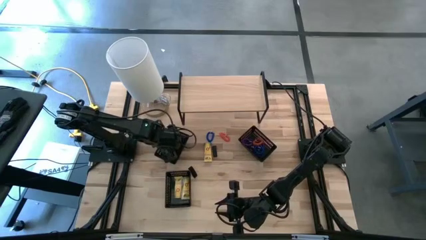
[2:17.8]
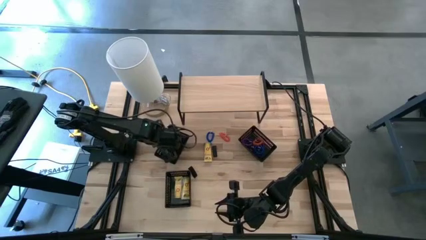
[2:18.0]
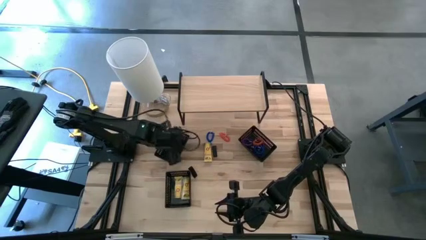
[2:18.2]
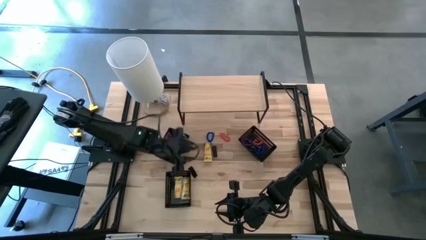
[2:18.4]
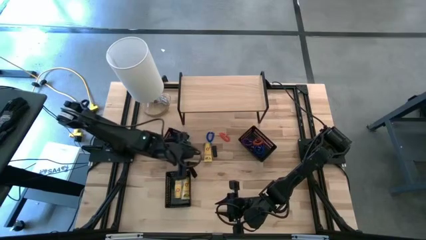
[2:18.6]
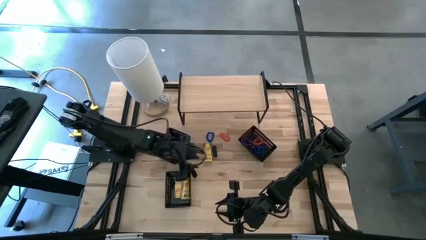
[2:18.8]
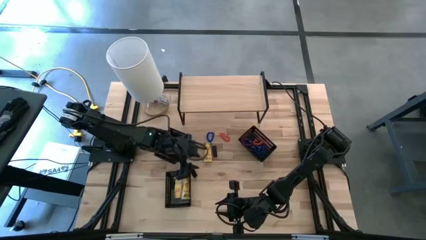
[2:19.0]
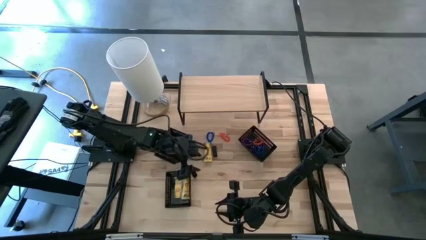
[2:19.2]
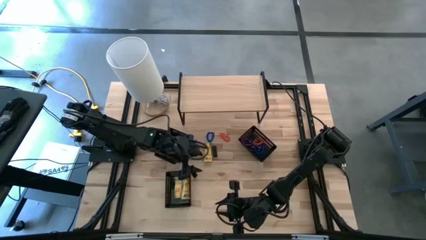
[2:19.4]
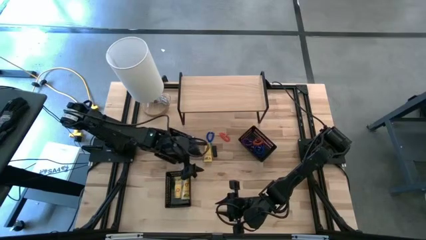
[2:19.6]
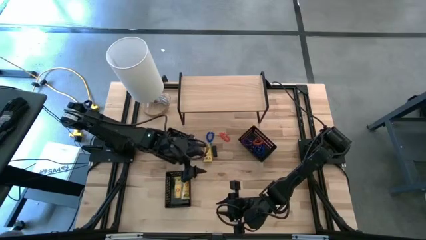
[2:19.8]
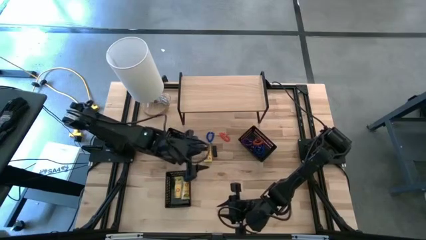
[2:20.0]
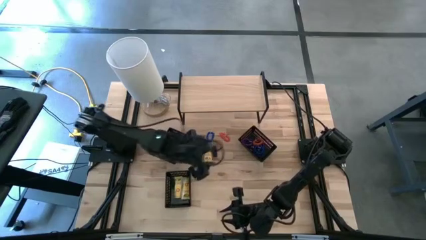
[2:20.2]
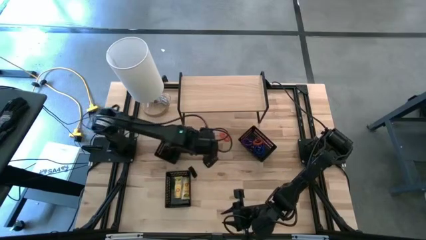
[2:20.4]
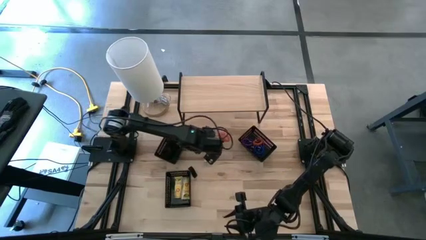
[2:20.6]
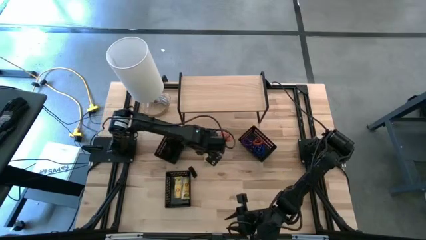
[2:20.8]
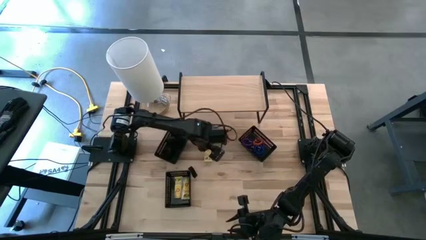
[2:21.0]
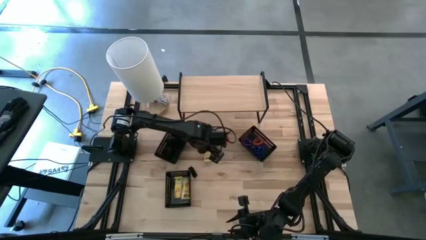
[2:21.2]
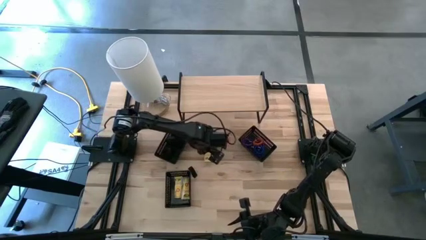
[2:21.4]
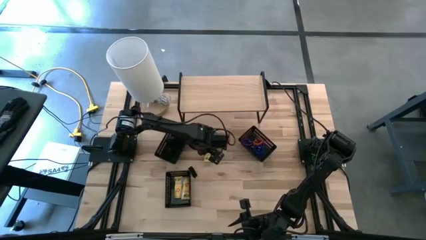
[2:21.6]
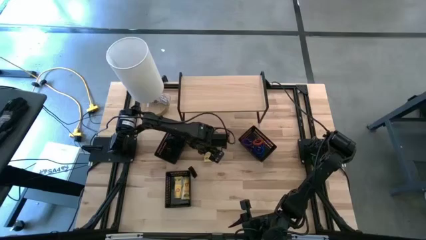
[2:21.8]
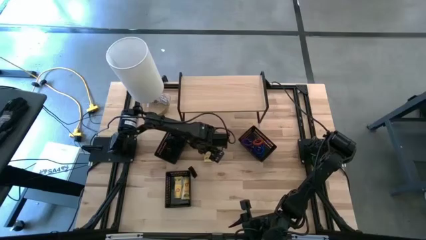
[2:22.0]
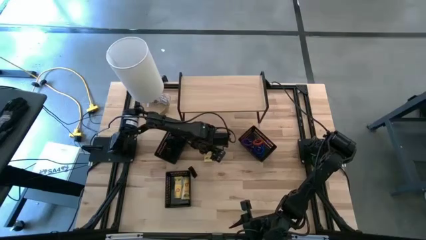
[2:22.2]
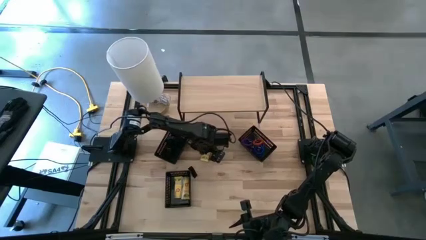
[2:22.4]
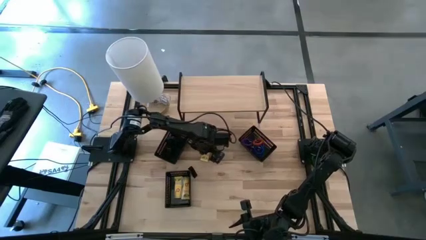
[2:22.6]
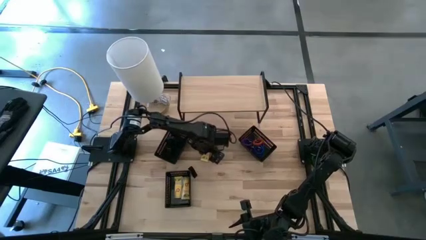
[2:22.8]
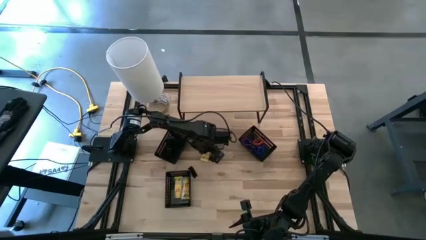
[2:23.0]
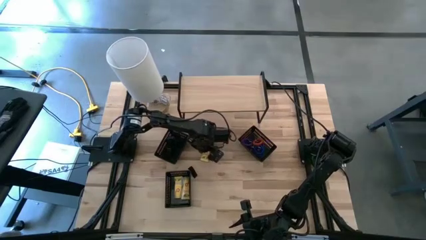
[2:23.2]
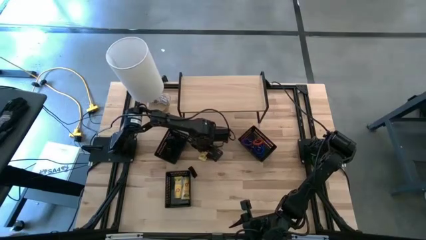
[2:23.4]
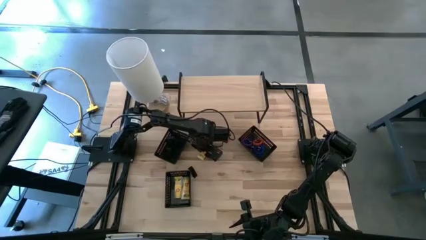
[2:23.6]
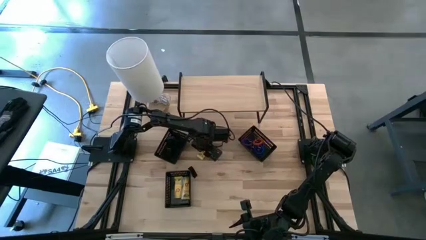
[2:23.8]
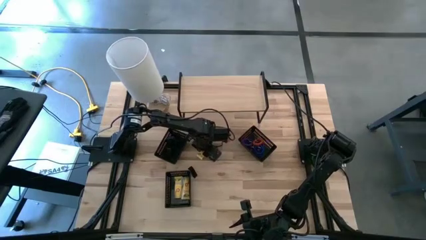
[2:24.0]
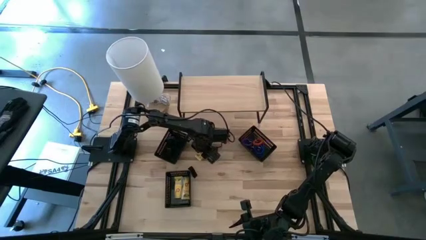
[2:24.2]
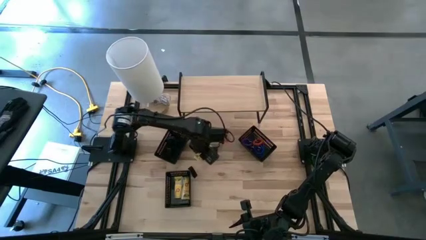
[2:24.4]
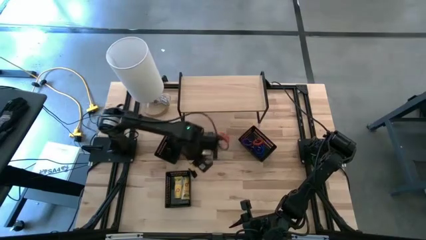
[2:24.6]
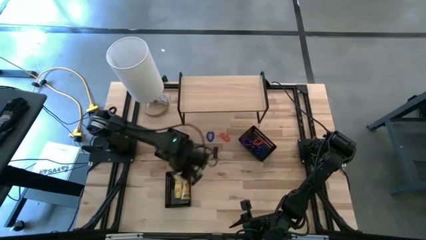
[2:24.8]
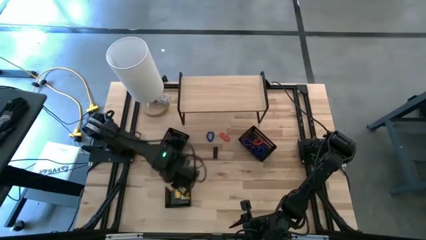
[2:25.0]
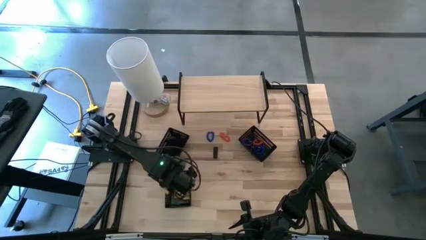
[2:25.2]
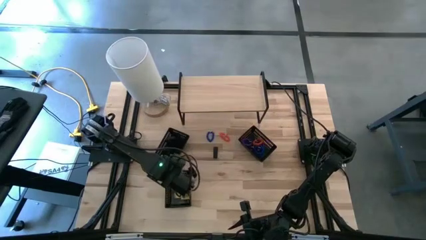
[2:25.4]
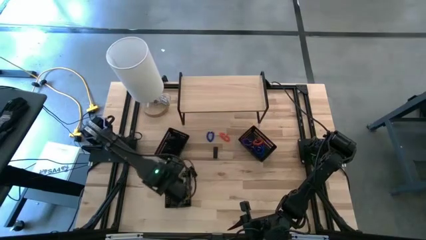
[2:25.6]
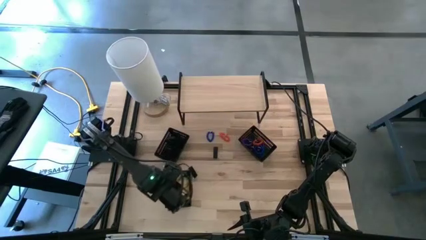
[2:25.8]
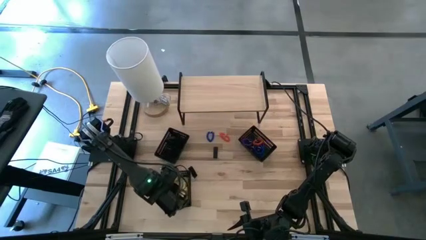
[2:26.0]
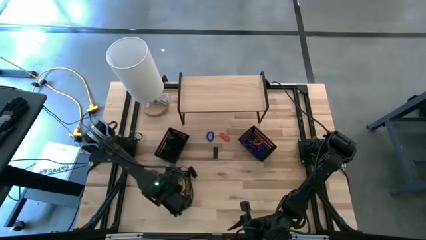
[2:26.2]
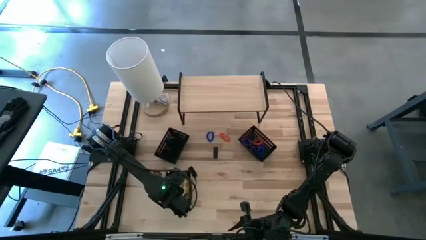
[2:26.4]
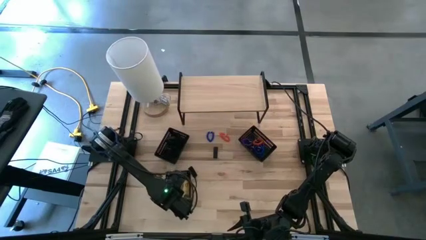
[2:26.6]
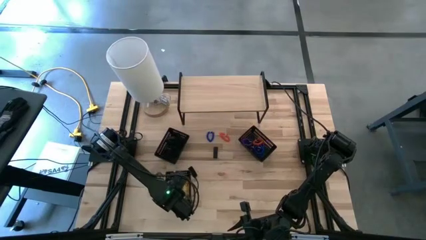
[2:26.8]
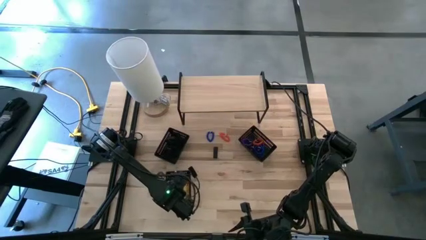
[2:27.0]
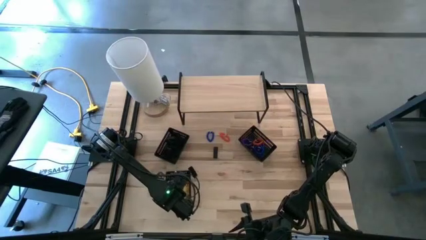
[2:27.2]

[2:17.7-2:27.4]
Task: Pick & Place Office Desk Supplies
Put the crayon box into the bottom black bin

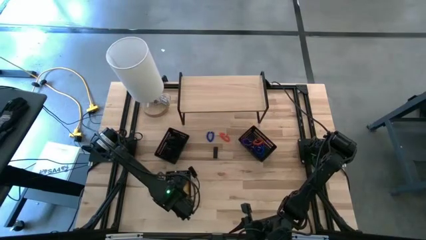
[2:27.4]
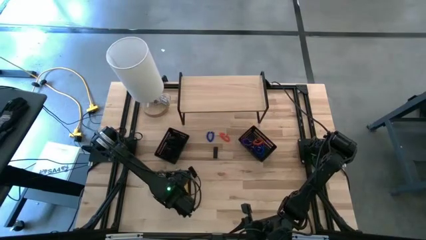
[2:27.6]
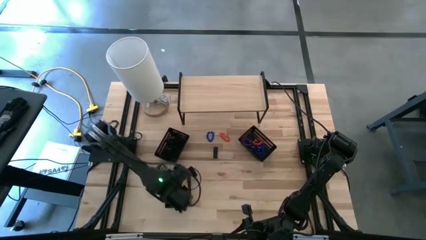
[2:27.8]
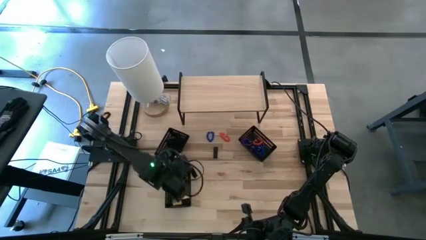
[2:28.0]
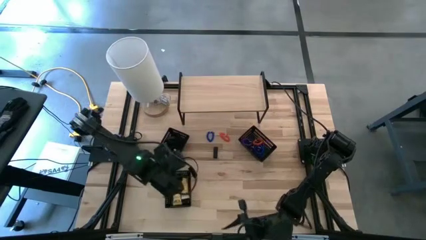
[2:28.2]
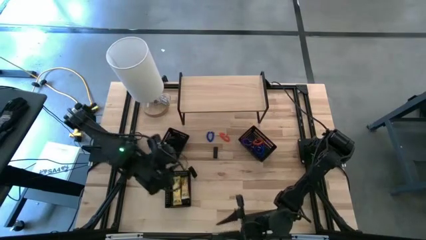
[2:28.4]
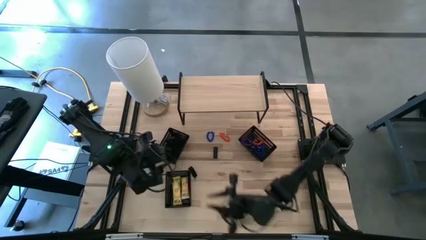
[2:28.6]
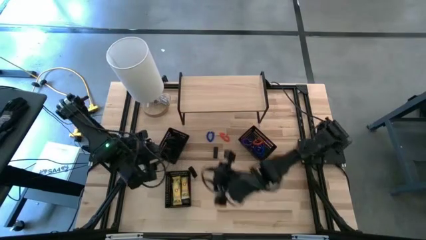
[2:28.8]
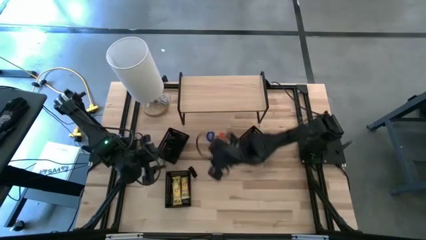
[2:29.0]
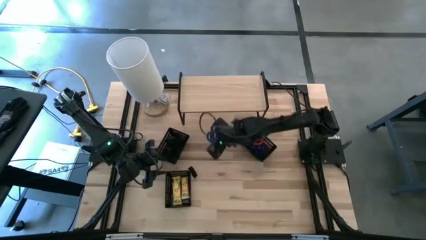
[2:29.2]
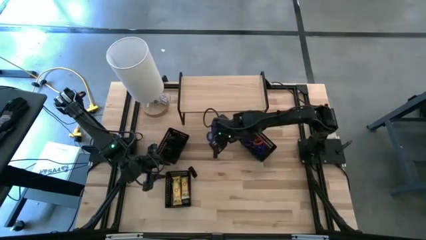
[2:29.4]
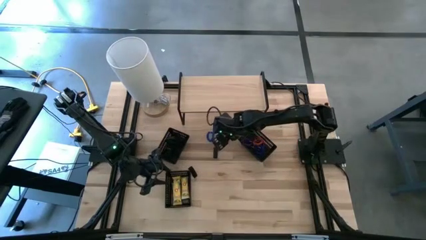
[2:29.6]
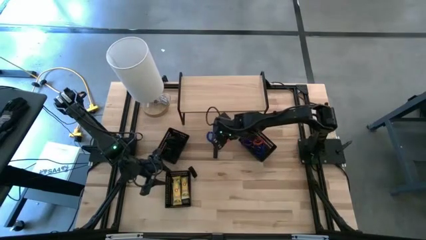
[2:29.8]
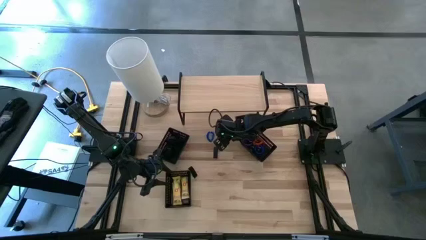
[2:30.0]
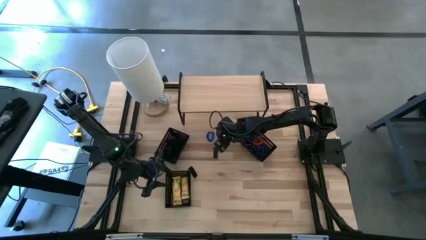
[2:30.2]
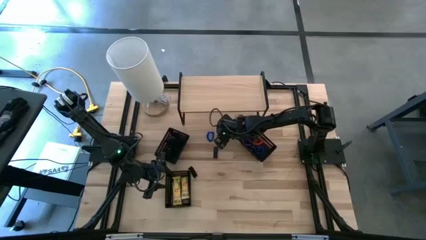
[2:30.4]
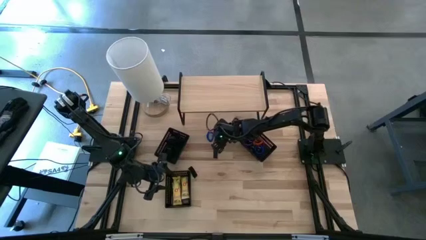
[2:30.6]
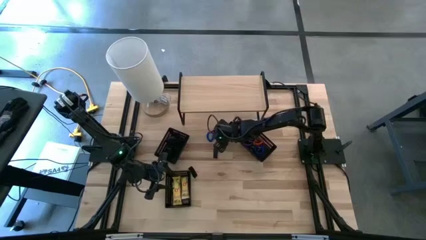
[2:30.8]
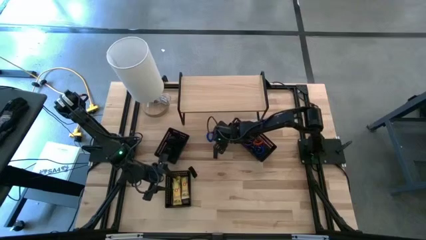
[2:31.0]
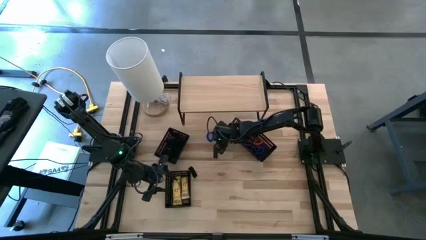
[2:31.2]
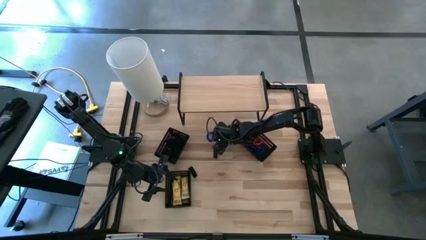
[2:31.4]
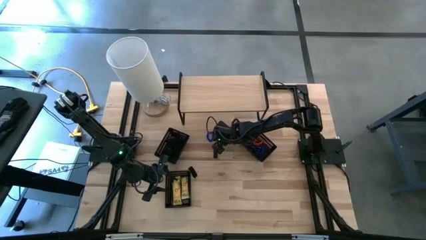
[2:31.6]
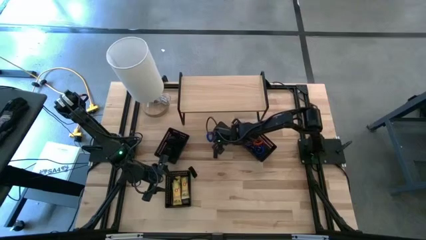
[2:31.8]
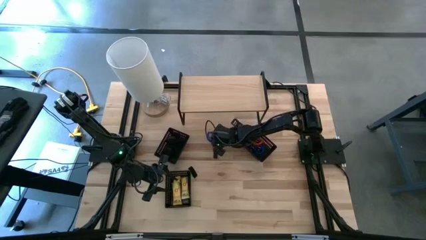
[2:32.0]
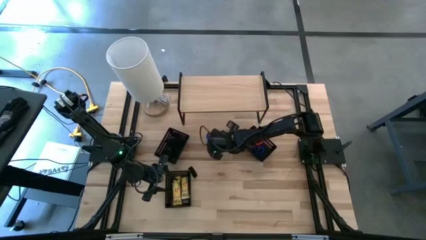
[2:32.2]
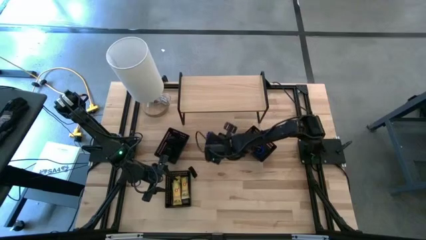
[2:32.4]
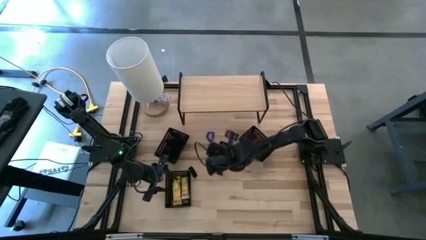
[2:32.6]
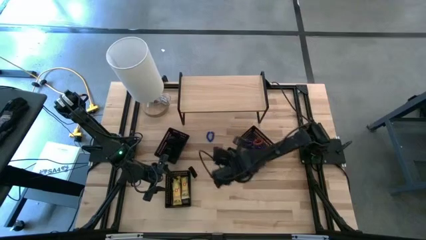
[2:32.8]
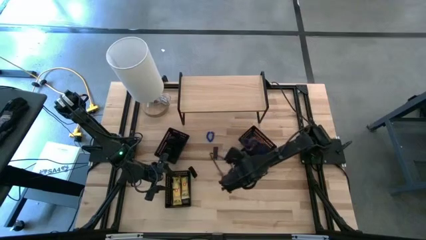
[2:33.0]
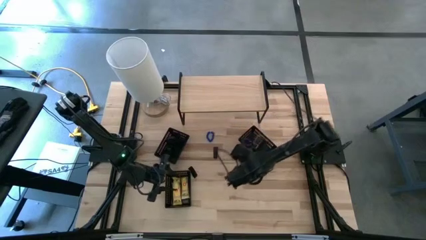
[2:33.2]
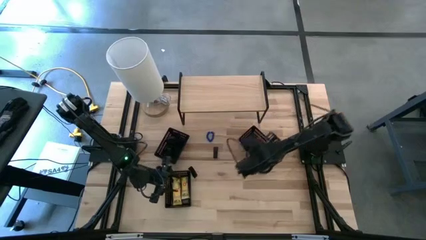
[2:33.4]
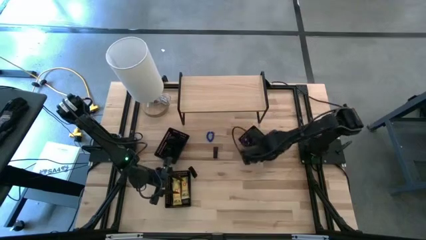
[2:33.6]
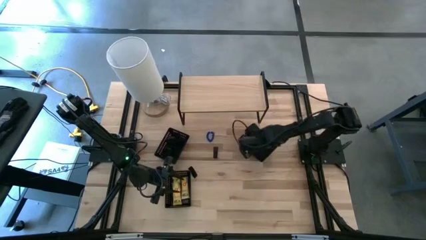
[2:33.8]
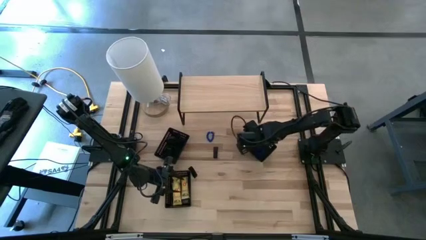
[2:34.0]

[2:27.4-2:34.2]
Put the orange spring keychain into the top right black bin
